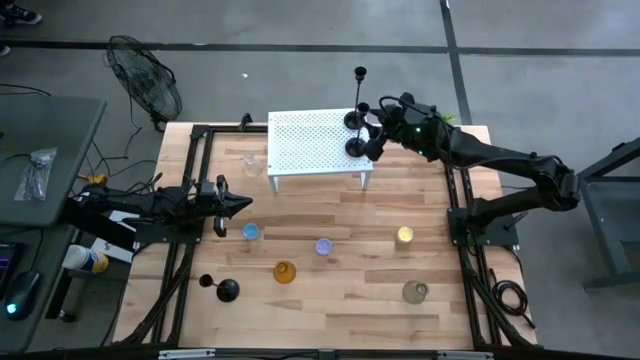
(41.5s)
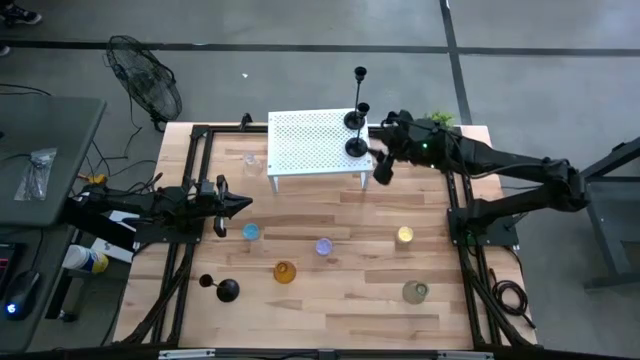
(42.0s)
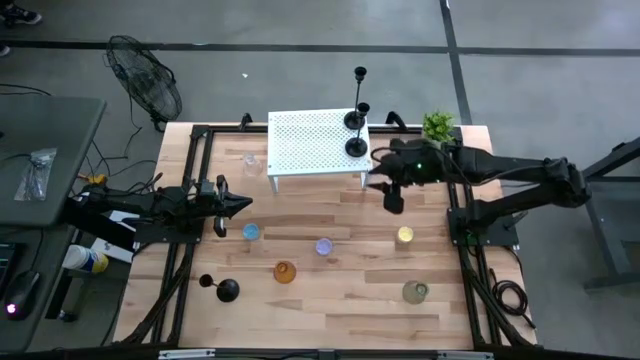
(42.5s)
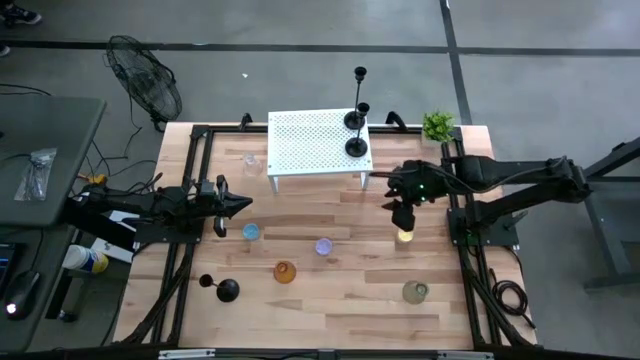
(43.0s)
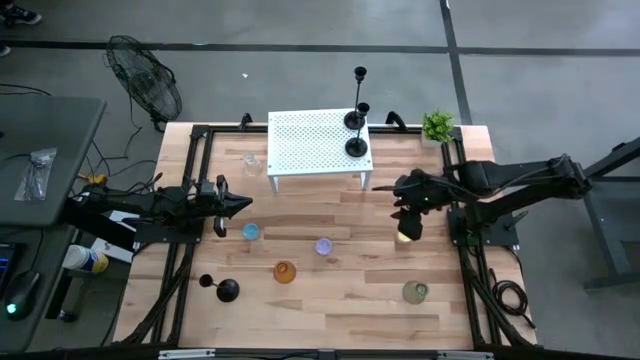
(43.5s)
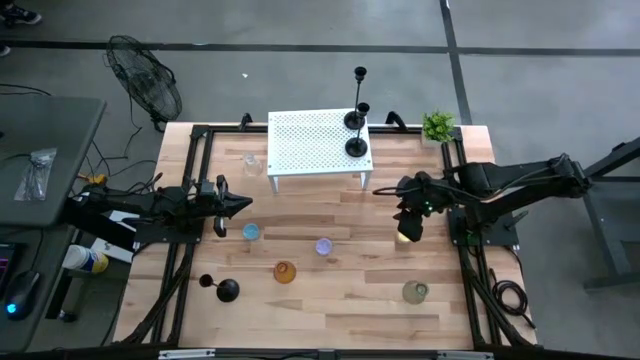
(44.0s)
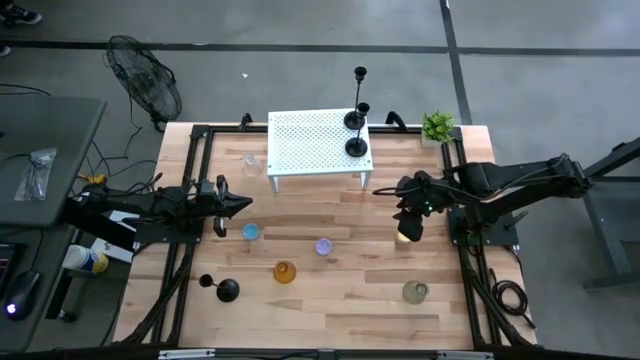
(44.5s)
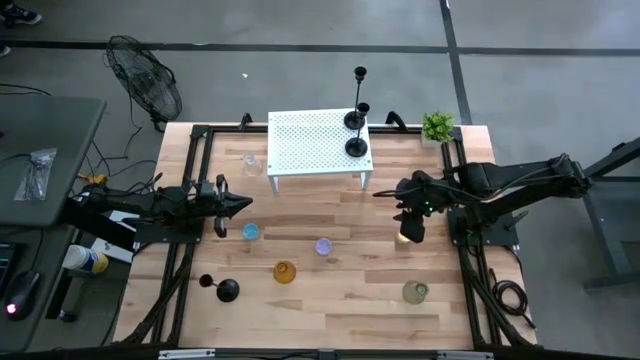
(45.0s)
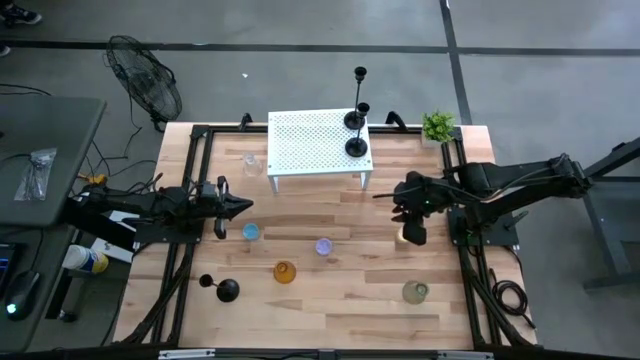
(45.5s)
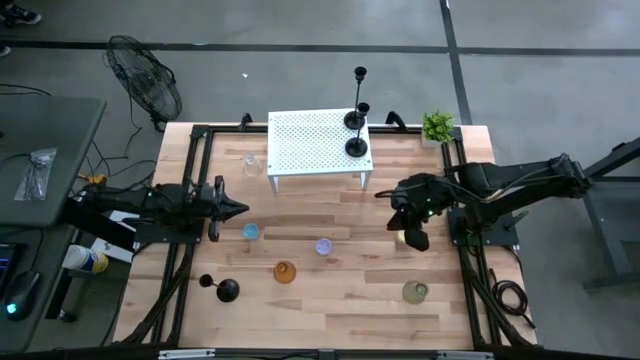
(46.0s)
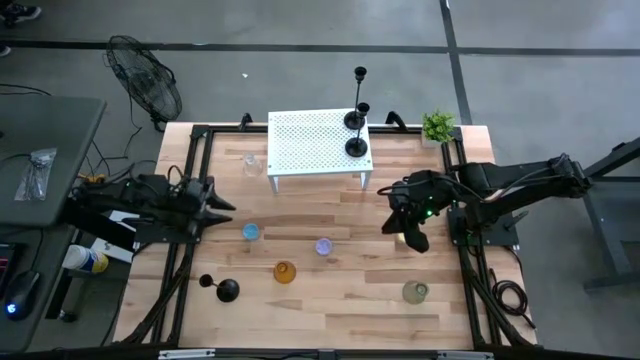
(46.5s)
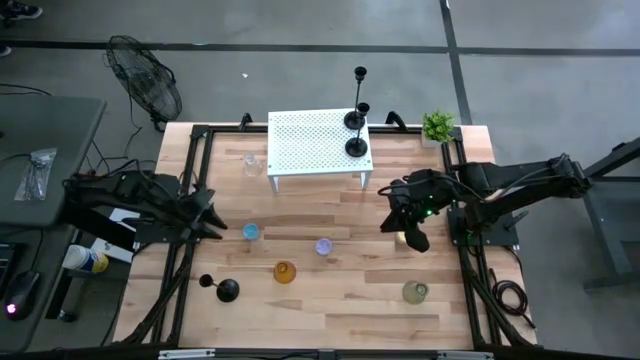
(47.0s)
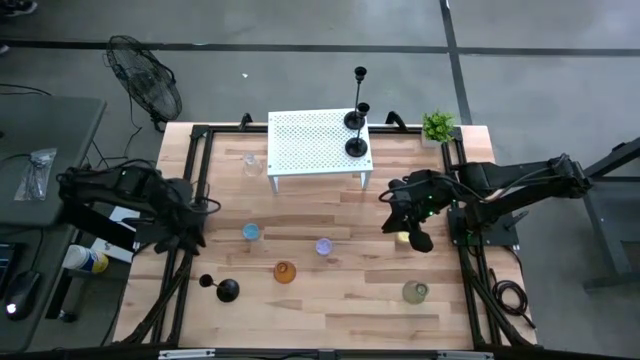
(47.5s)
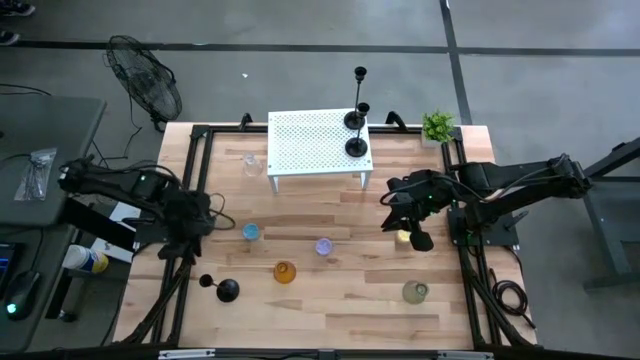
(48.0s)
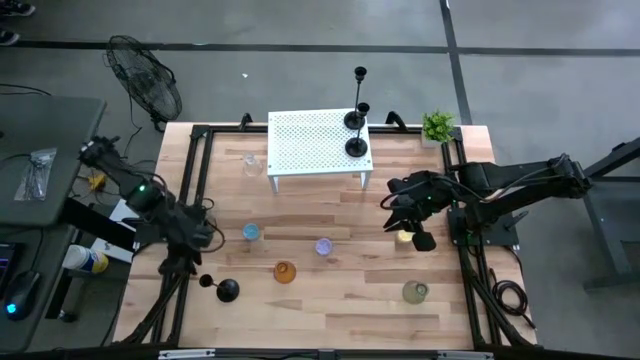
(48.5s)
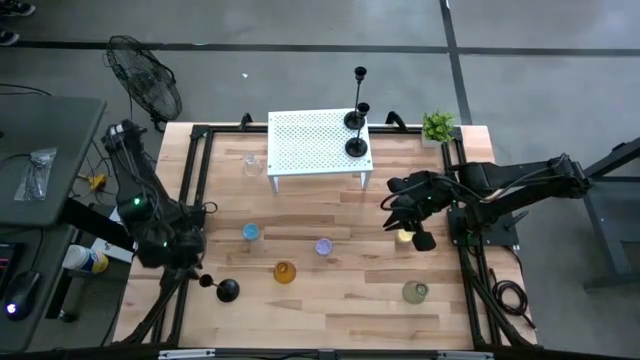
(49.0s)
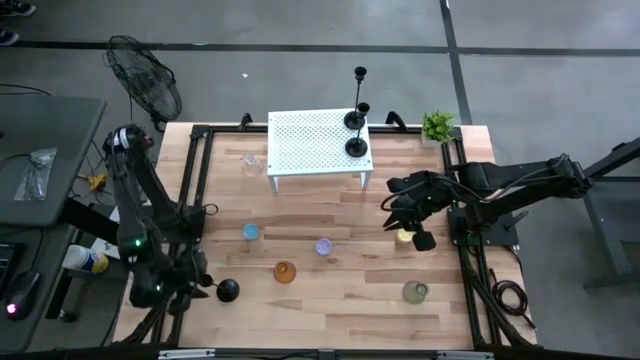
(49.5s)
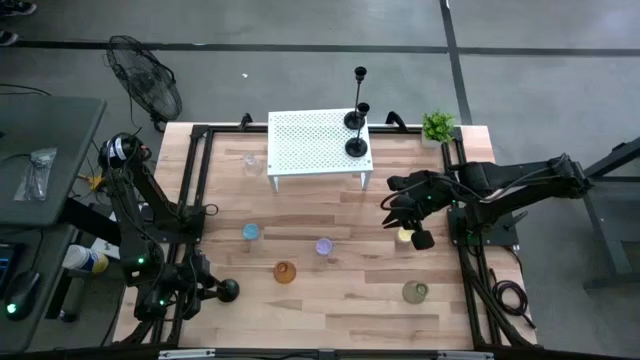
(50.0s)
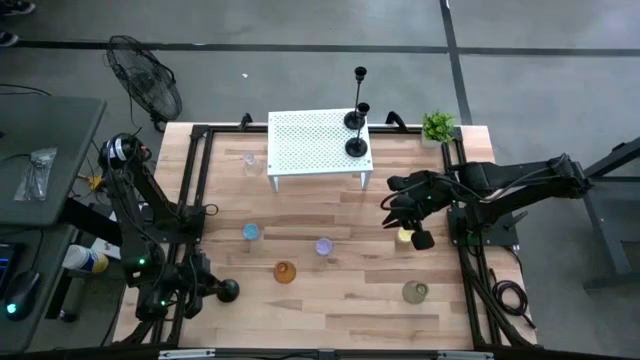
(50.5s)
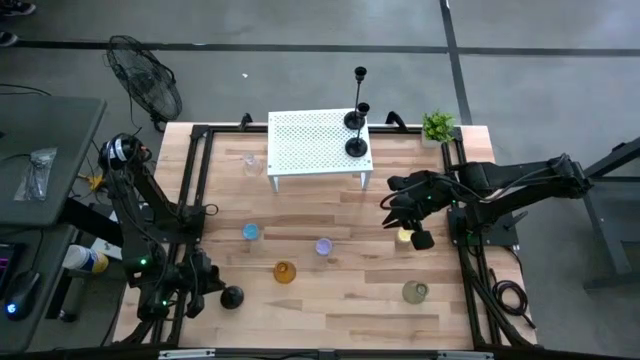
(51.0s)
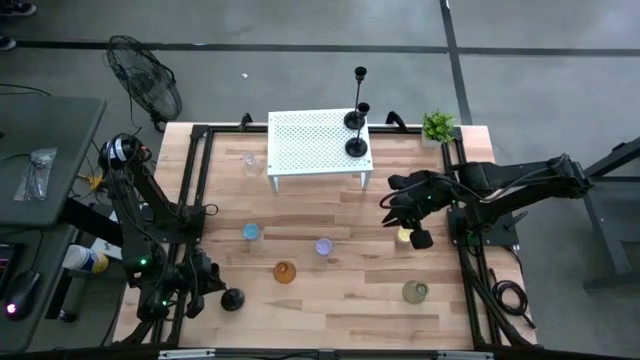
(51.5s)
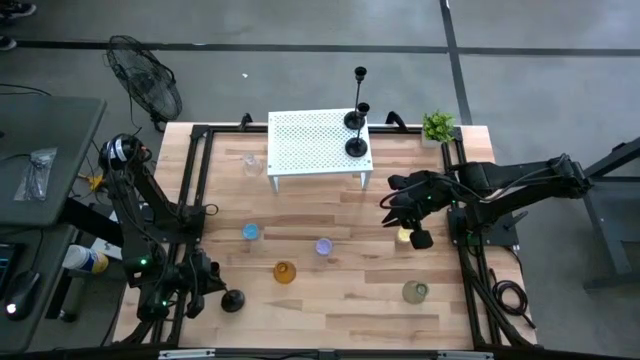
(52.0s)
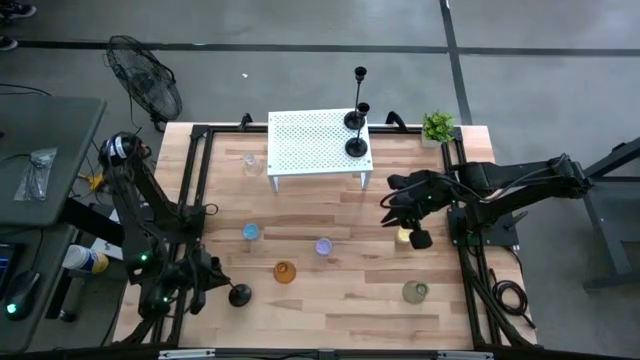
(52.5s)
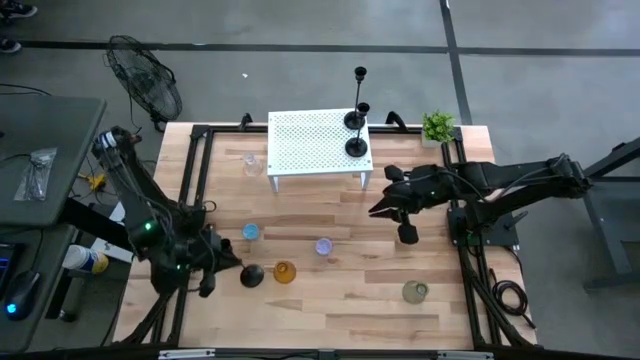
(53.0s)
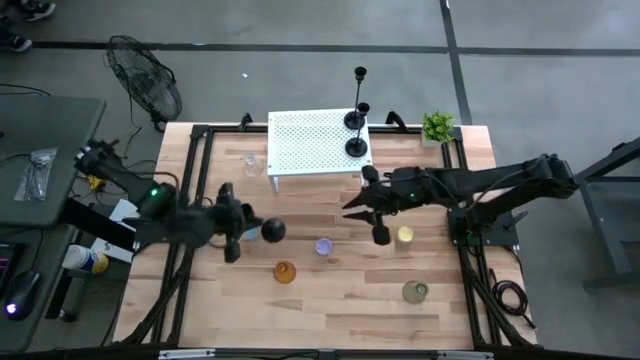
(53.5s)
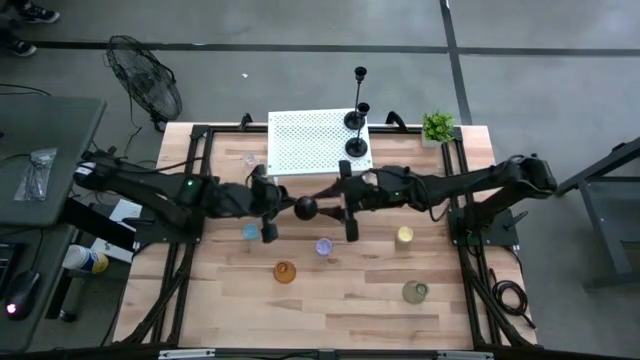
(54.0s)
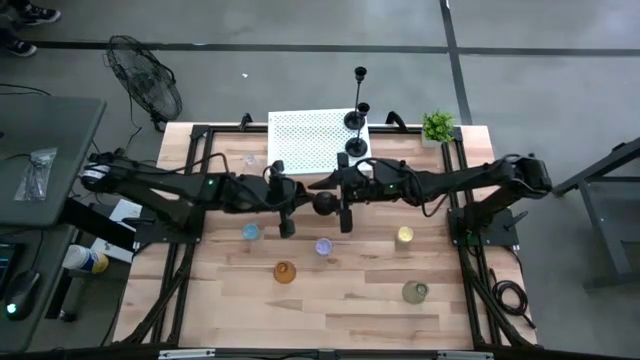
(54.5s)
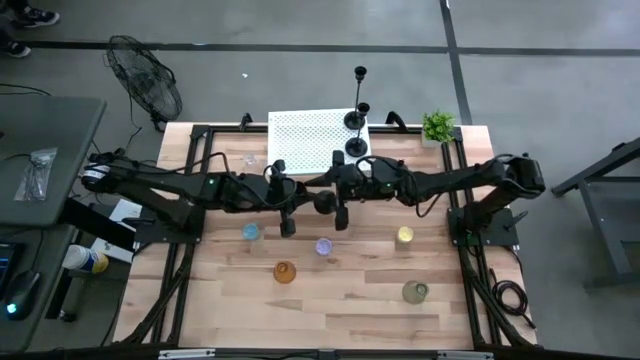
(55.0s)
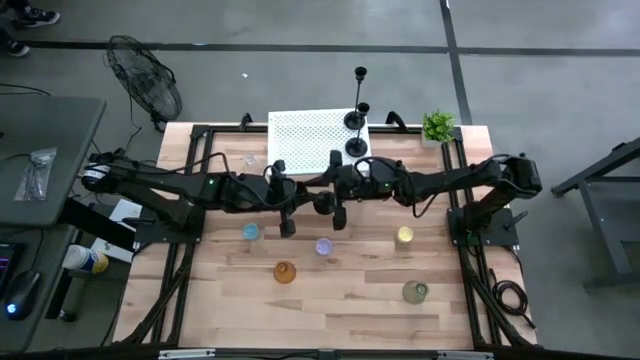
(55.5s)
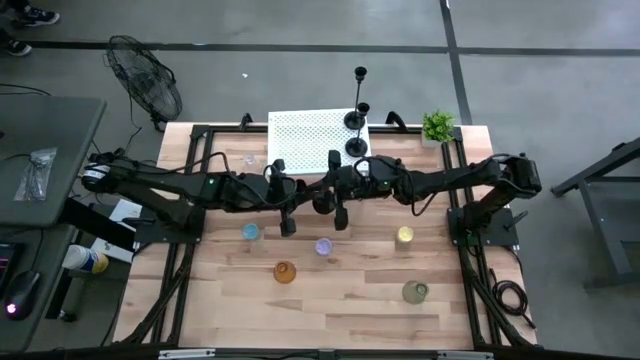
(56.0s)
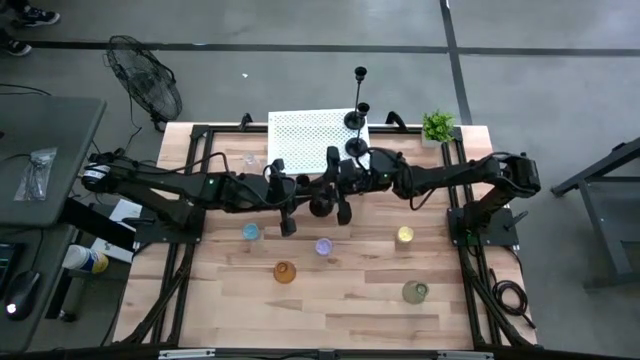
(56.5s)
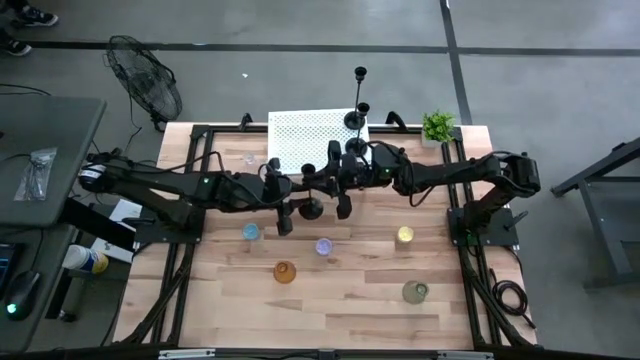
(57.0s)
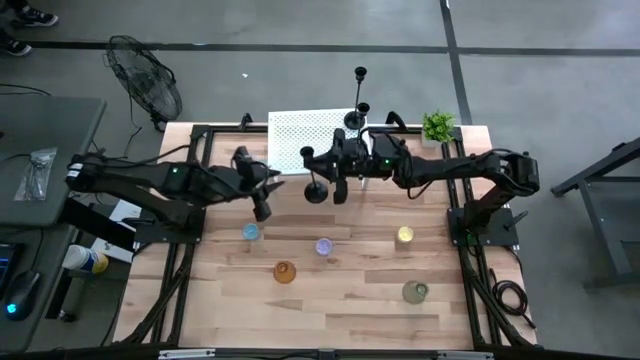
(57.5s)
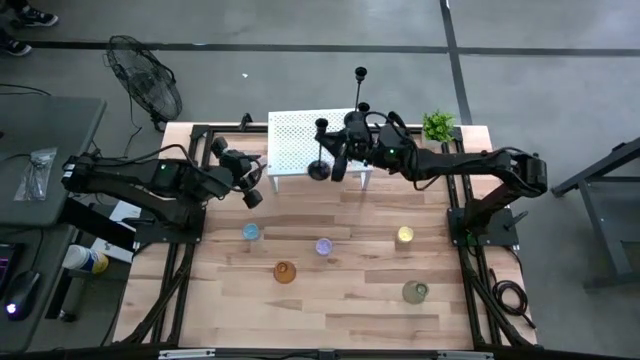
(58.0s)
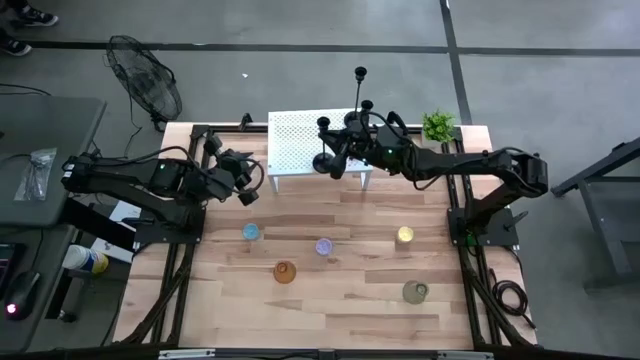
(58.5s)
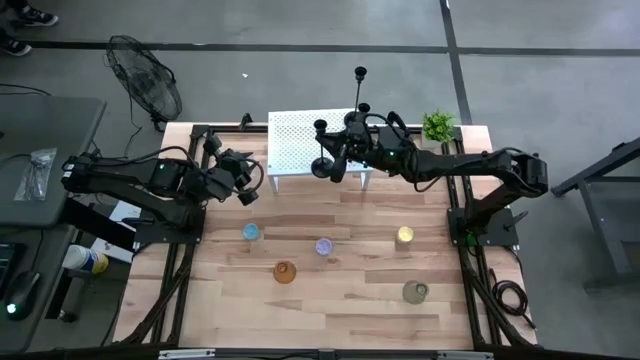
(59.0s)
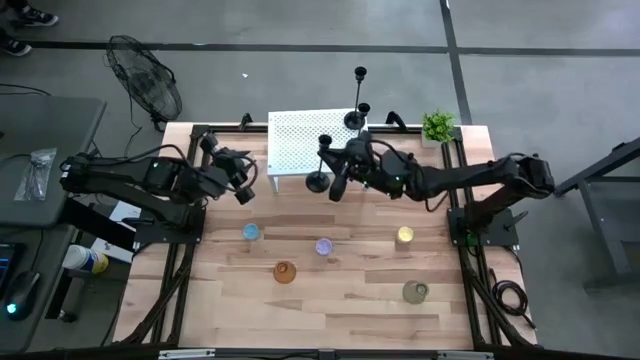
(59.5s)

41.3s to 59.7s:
Task: Pick & Place candle stick holders
Put the black candle holder on the shelf

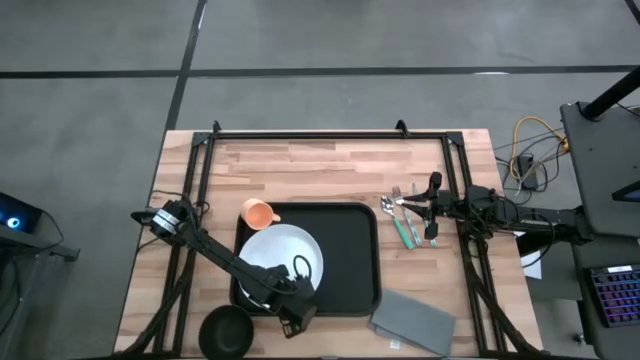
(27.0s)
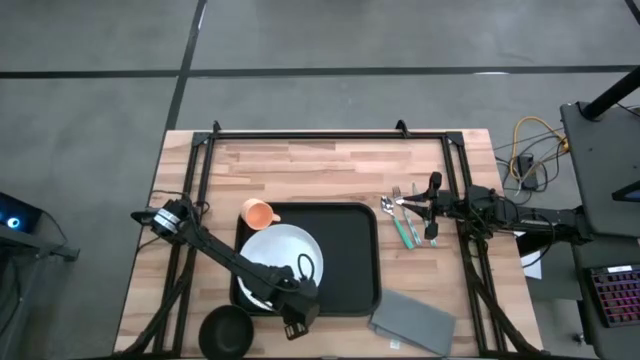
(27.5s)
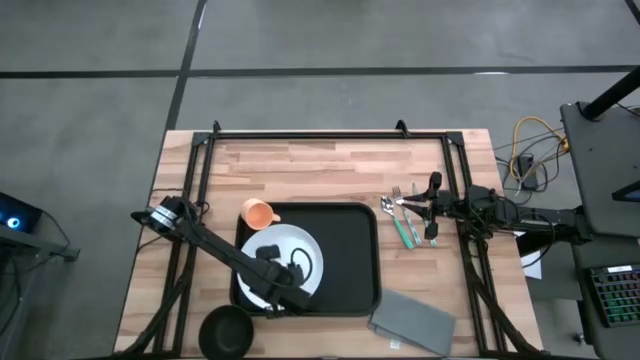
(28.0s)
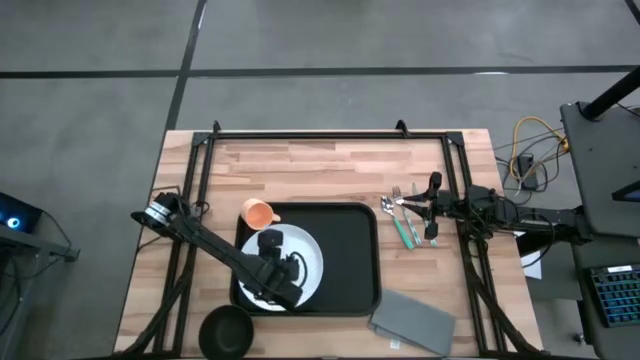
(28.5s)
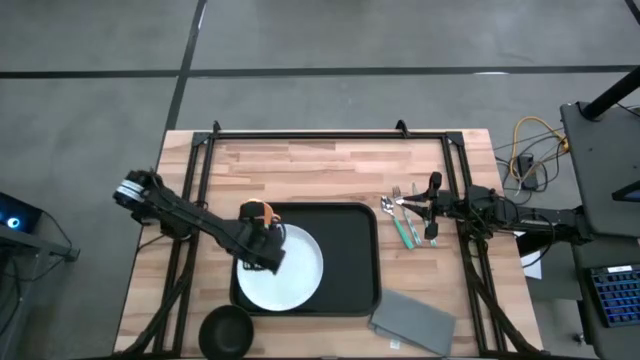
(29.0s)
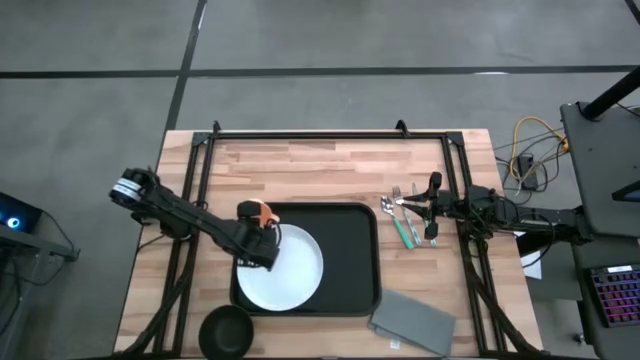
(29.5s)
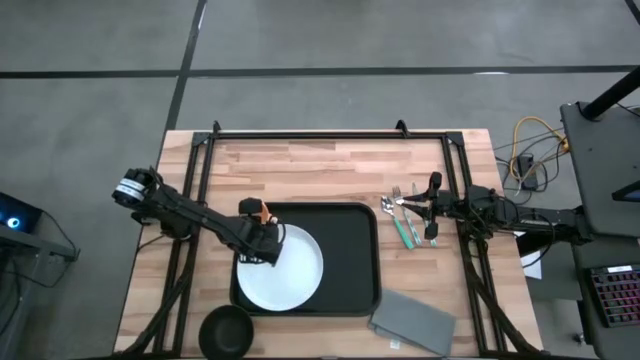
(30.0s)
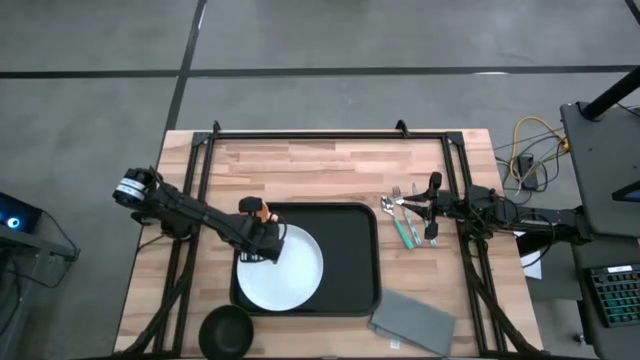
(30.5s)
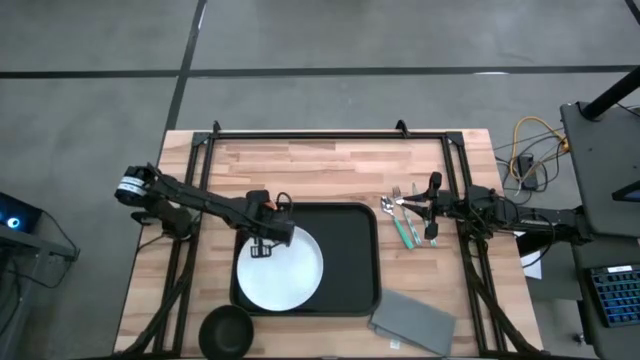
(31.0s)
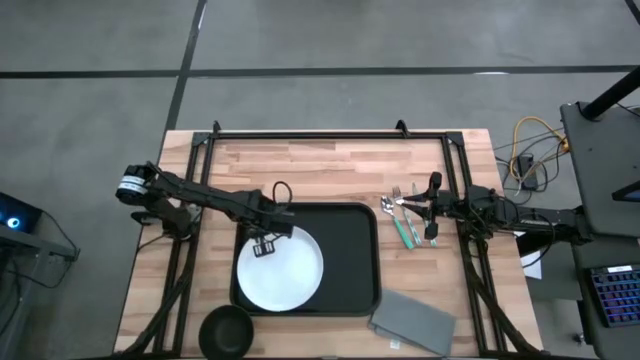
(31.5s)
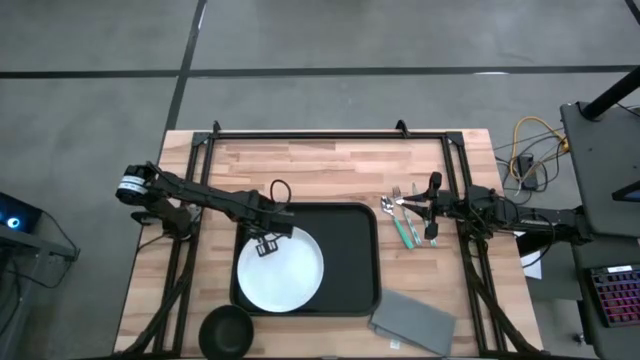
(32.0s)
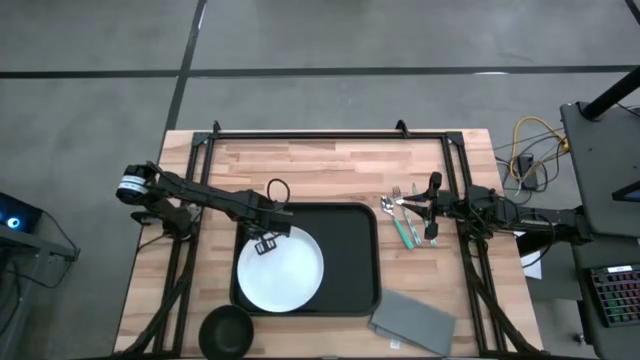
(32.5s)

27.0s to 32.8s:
Task: Set up tray
Adjust the orange mug on the black tray
